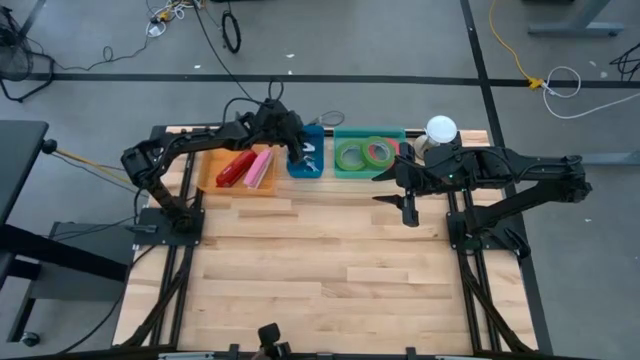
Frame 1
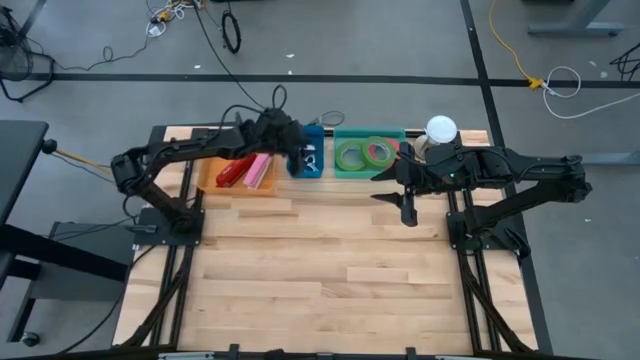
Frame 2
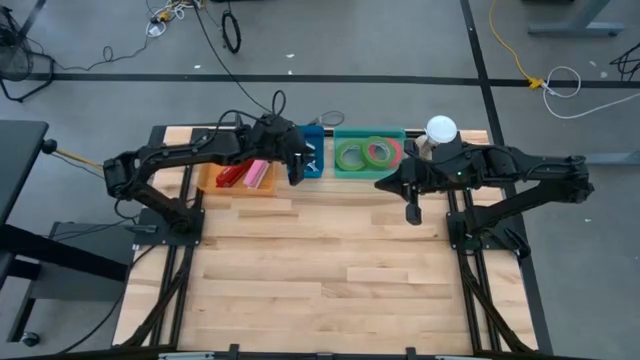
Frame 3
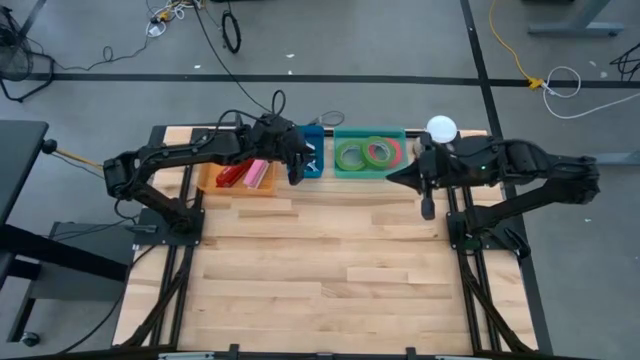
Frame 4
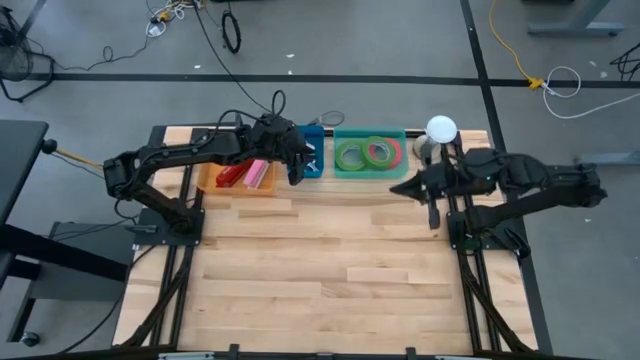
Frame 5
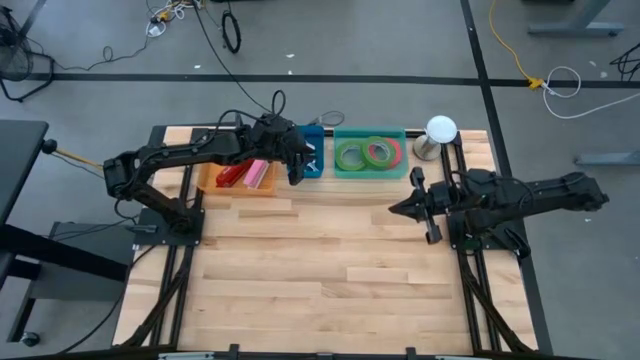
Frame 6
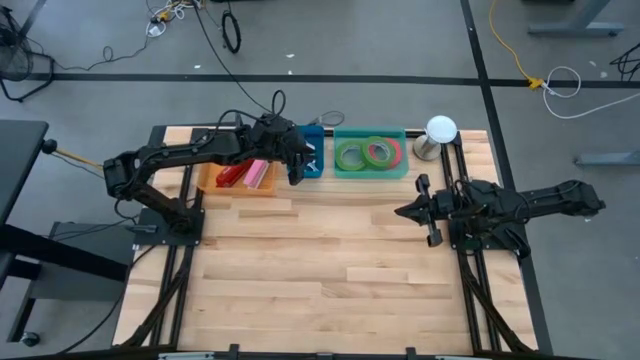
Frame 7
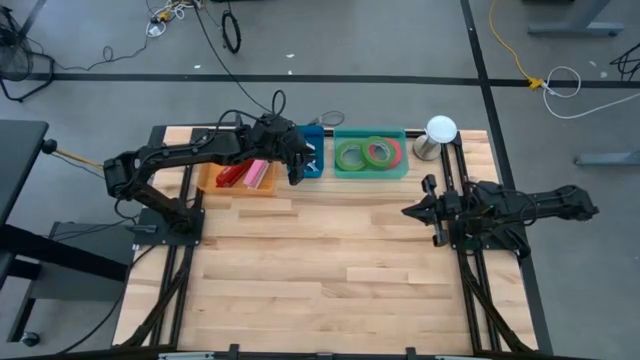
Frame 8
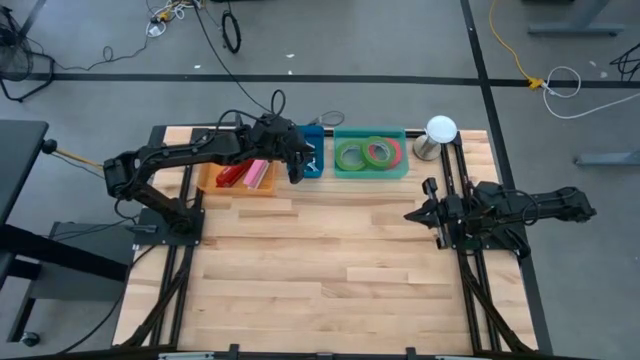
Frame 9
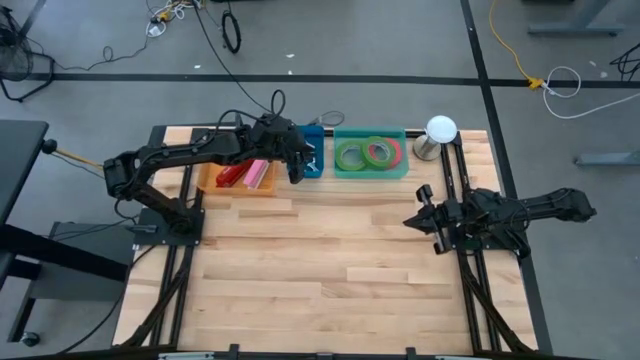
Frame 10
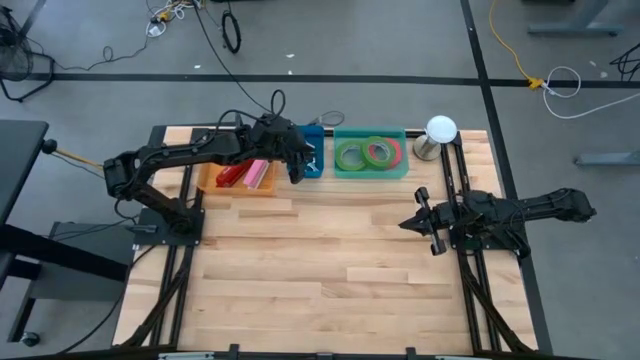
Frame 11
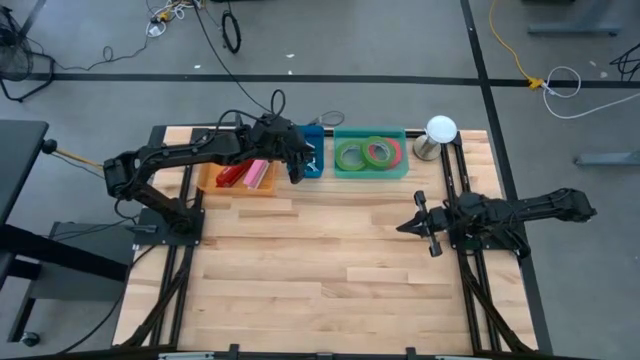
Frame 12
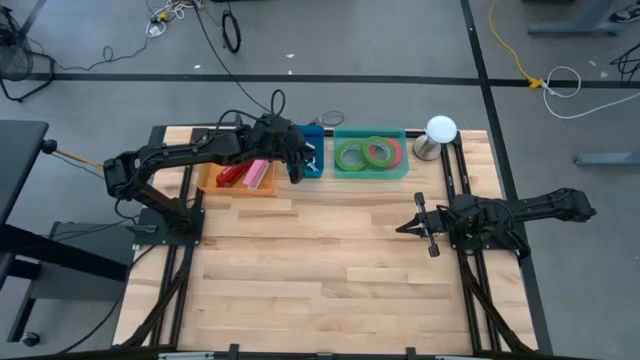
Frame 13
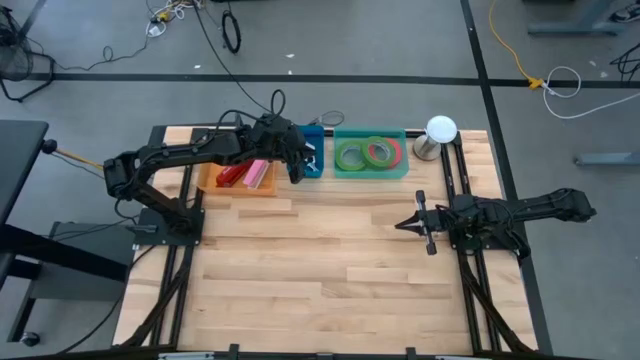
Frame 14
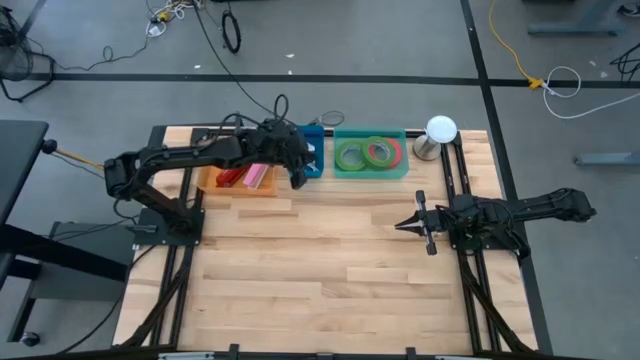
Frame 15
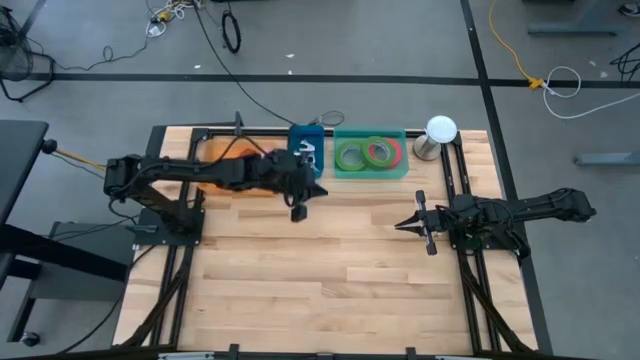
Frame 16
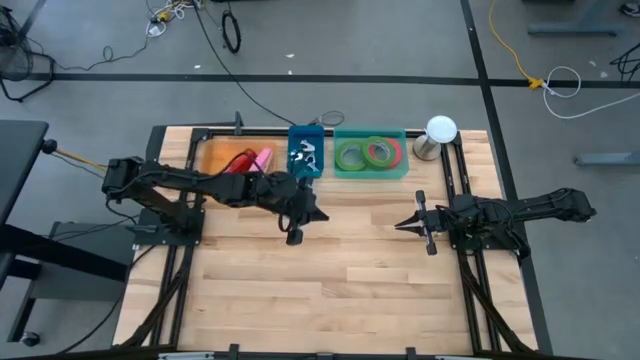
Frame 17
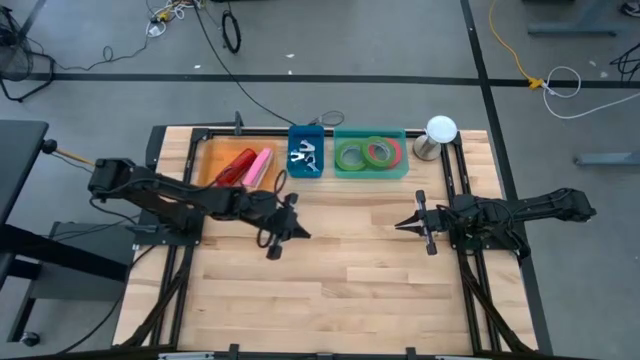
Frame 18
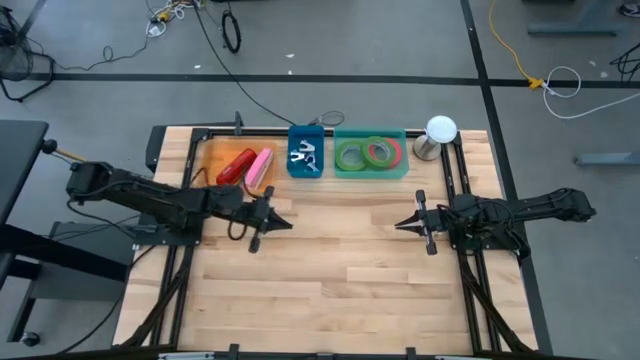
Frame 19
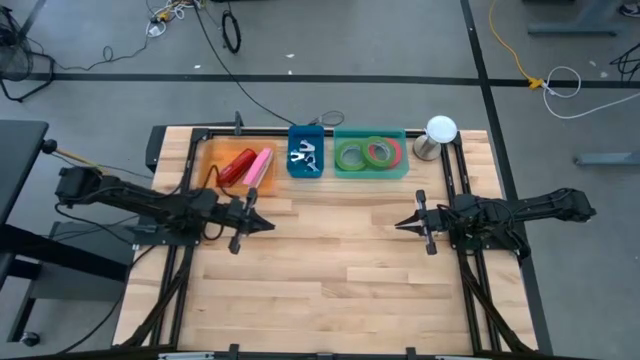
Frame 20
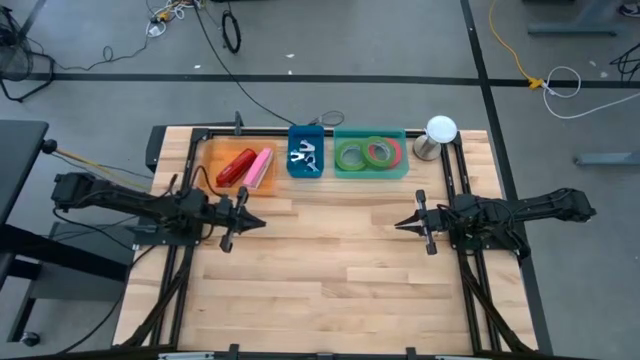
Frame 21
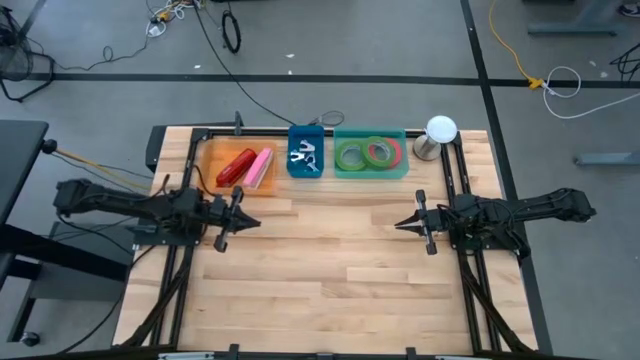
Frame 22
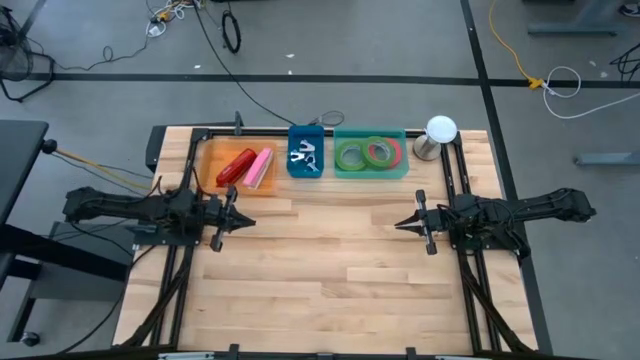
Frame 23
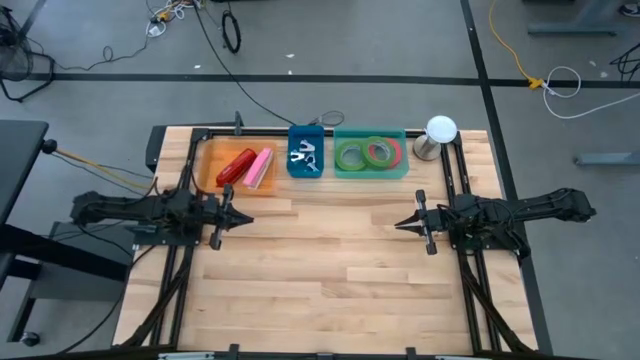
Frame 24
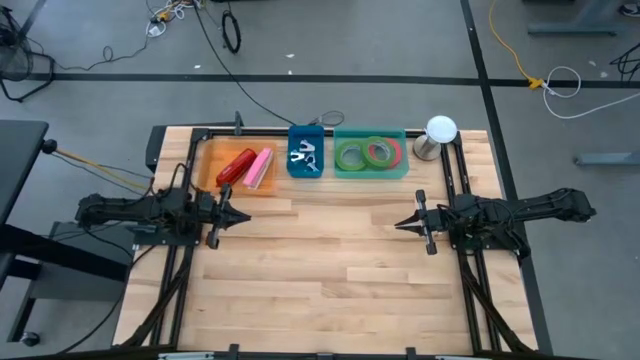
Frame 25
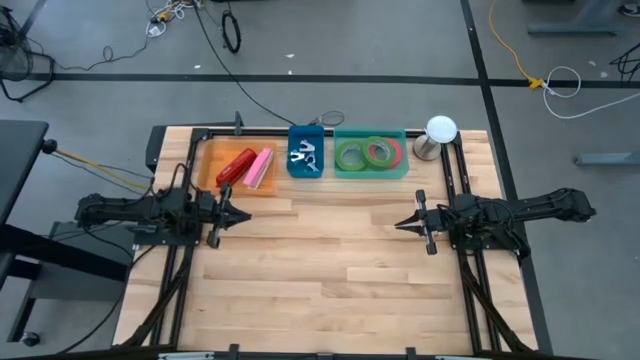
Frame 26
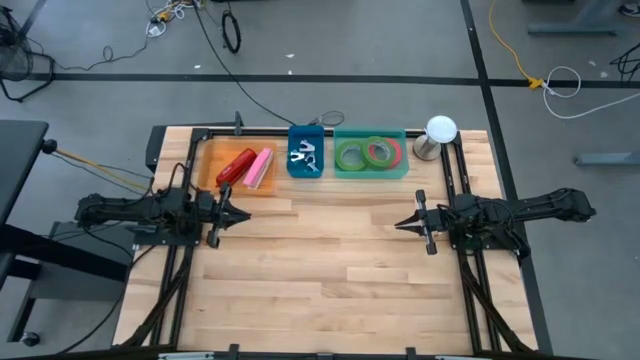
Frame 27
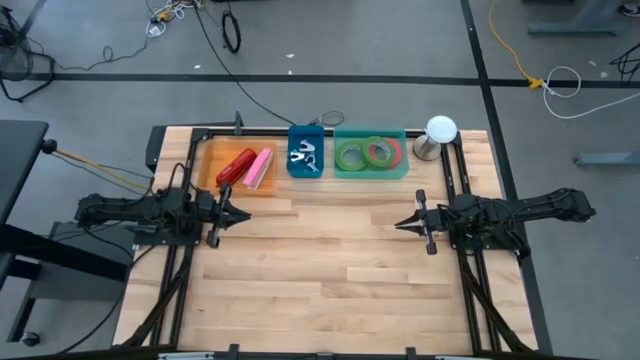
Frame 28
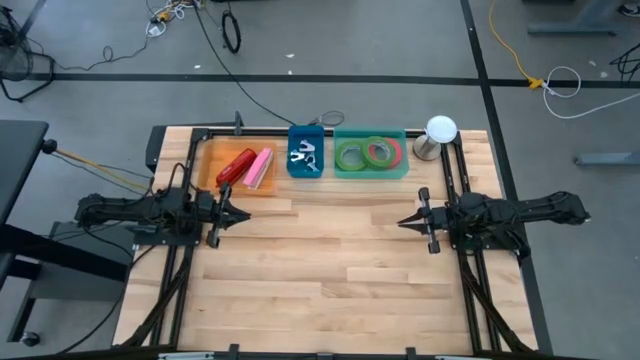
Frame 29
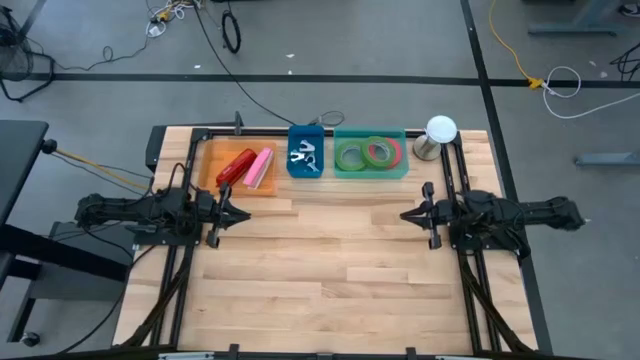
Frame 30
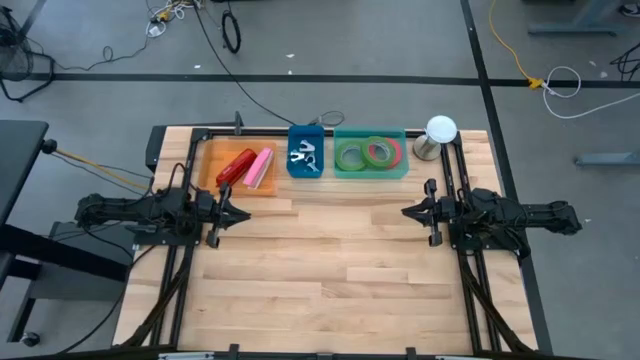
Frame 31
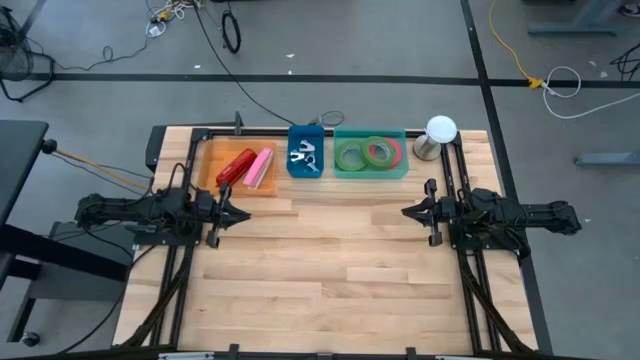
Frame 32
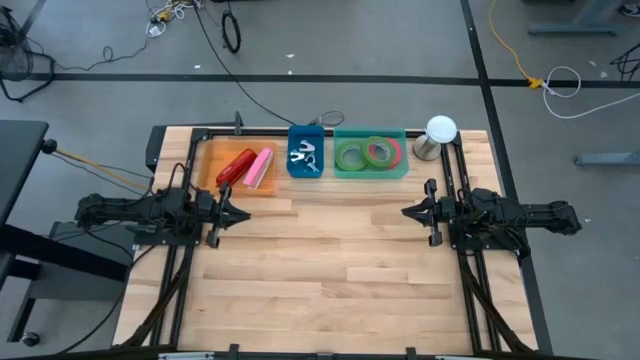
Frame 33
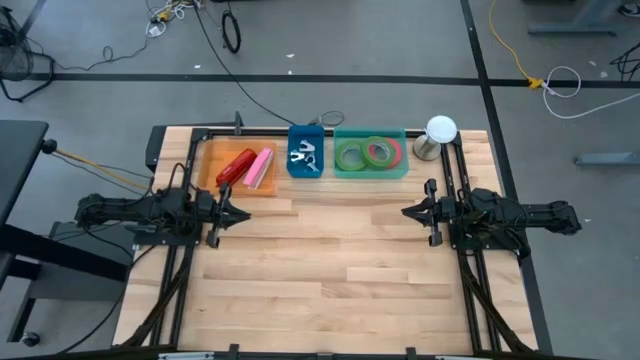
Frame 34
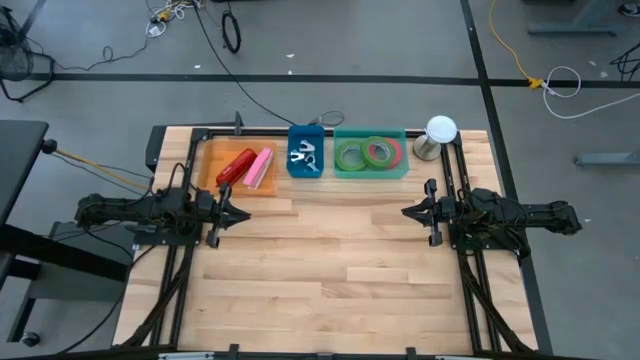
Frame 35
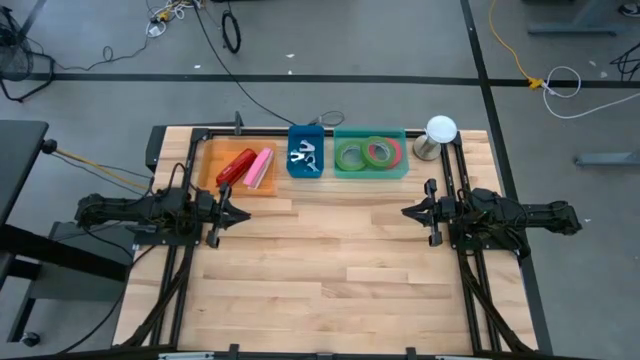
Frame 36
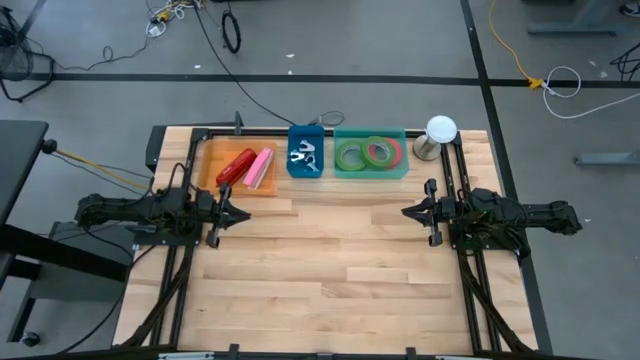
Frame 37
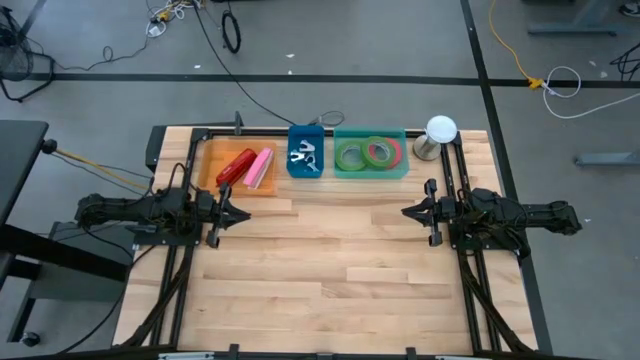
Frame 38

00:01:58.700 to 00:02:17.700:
Task: Pick and place Stapler, Stapler remover, tape
Return to Home Position

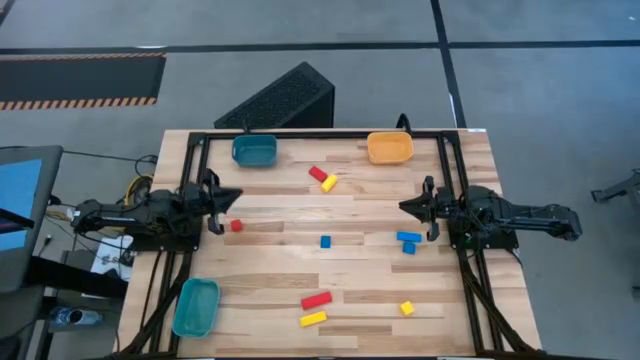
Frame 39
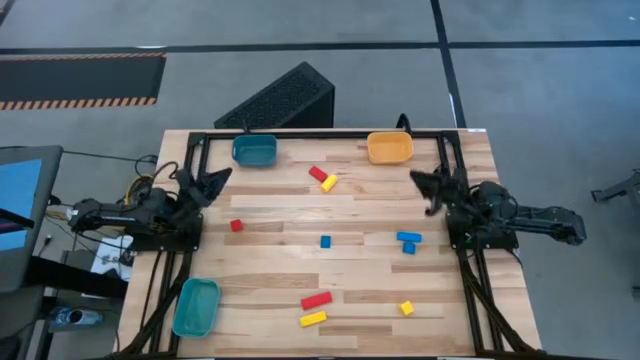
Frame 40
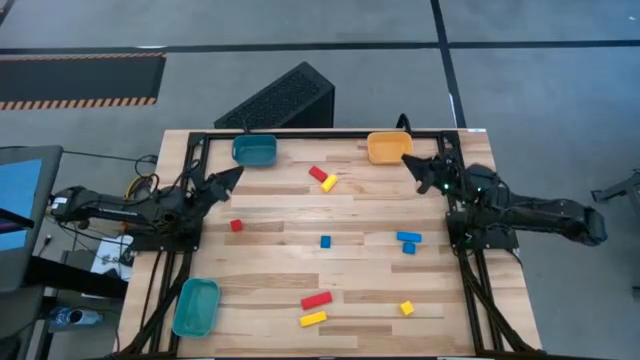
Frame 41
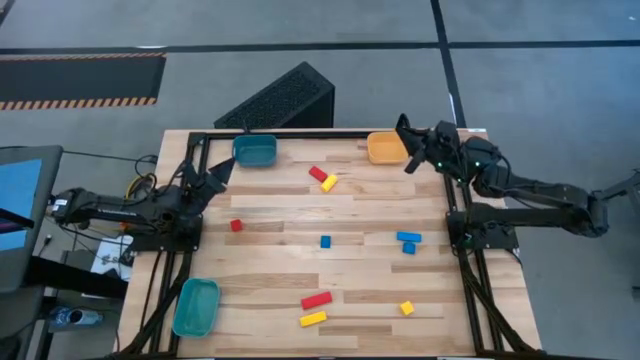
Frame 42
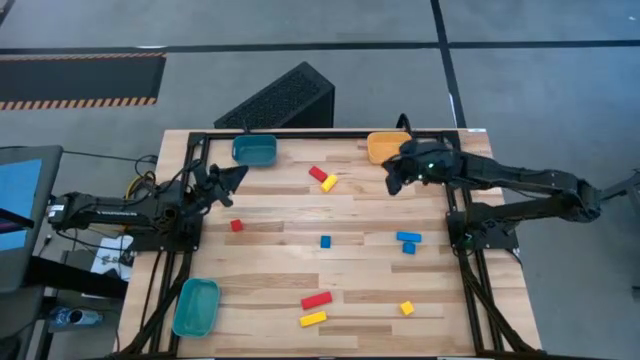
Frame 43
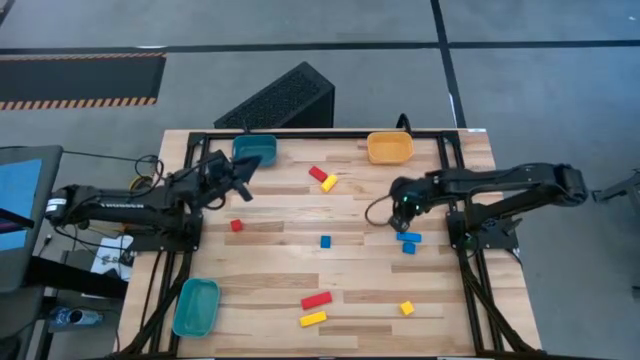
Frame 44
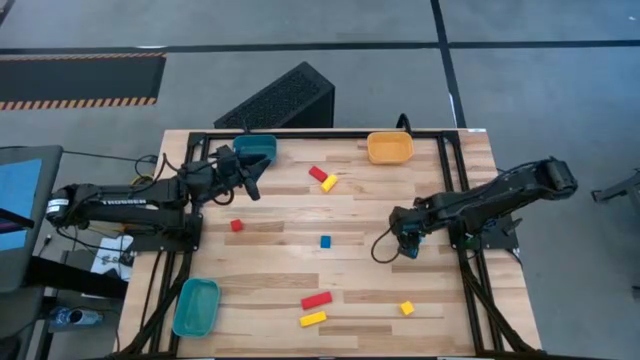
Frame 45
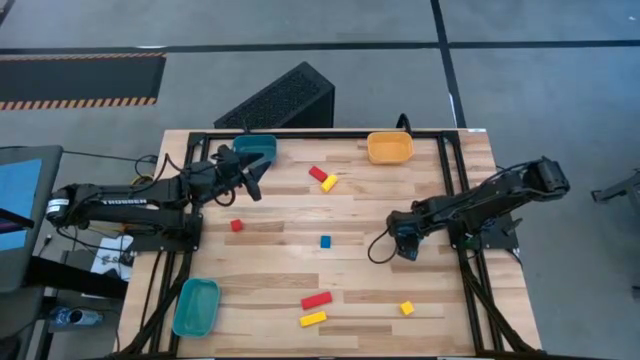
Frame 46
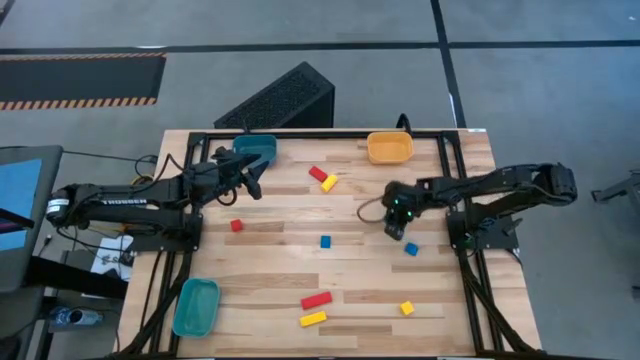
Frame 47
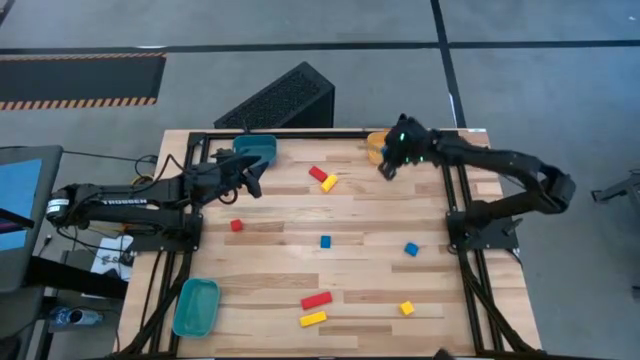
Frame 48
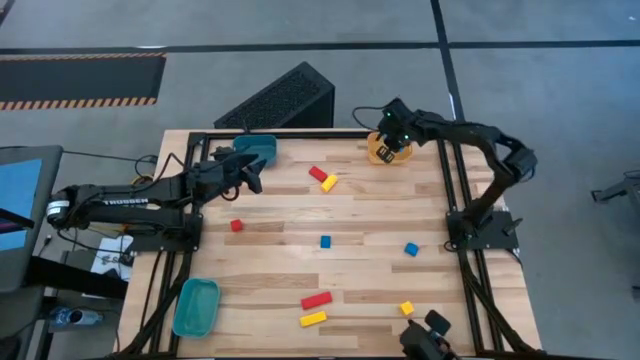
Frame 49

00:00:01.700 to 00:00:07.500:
Task: Sort & place blocks by color
Put the middle right blue block into the yellow bin
